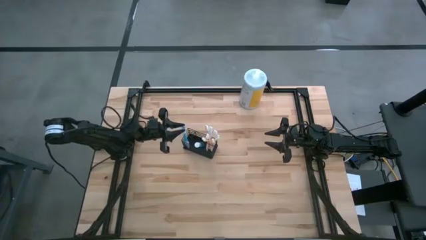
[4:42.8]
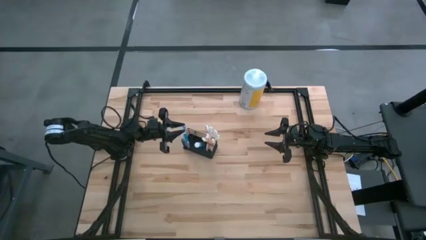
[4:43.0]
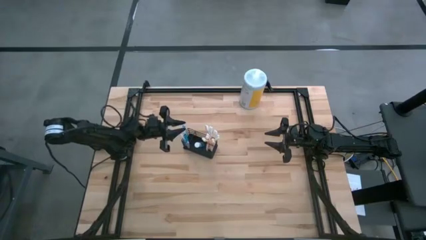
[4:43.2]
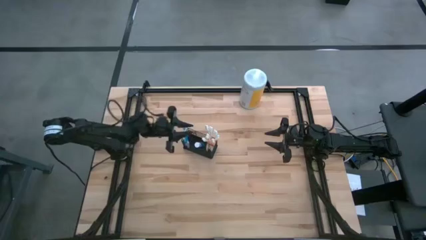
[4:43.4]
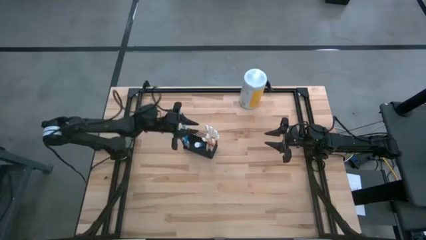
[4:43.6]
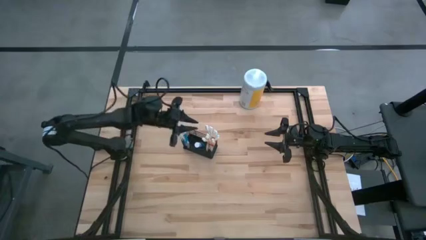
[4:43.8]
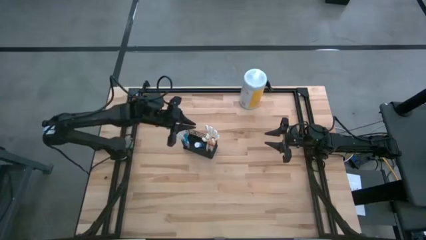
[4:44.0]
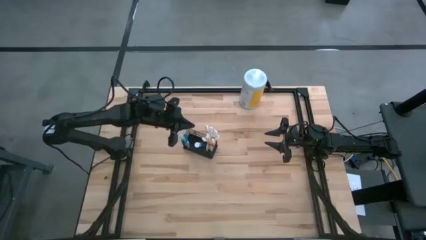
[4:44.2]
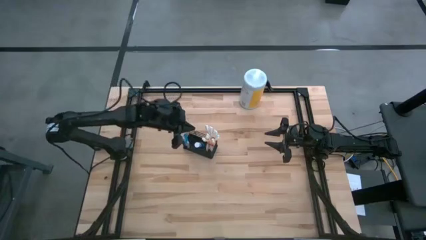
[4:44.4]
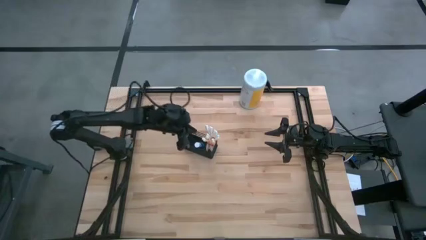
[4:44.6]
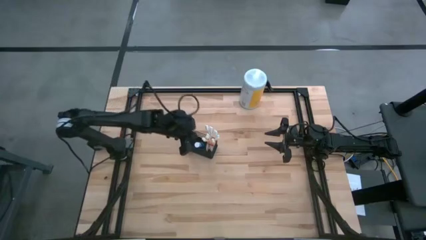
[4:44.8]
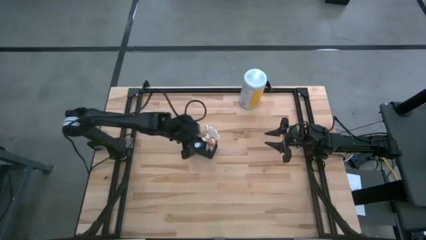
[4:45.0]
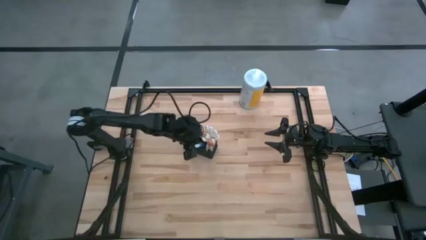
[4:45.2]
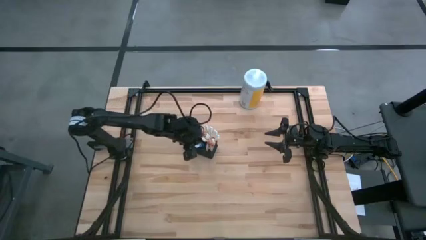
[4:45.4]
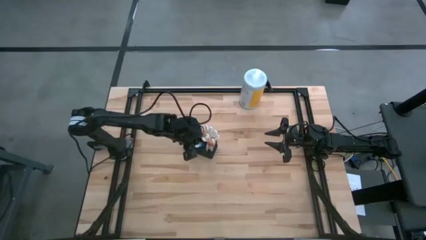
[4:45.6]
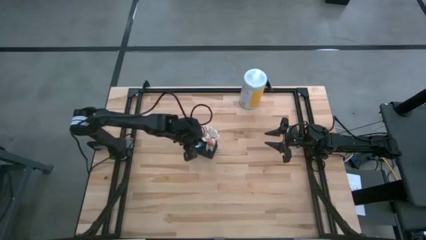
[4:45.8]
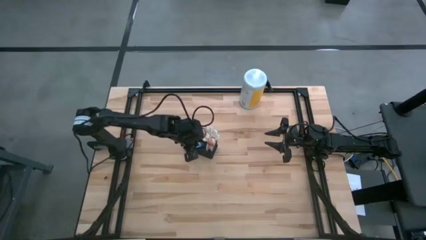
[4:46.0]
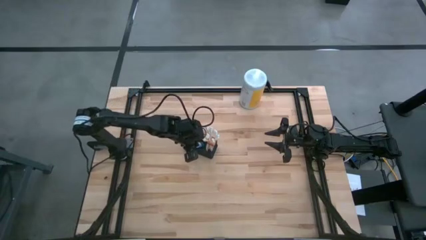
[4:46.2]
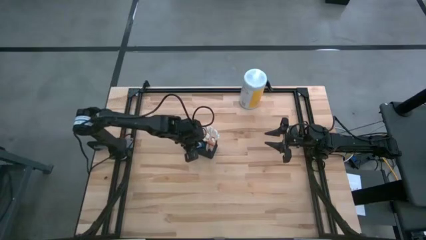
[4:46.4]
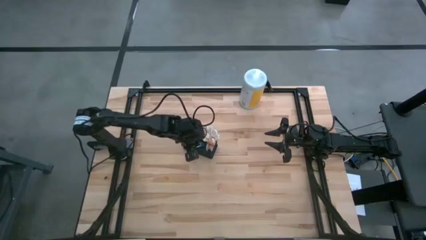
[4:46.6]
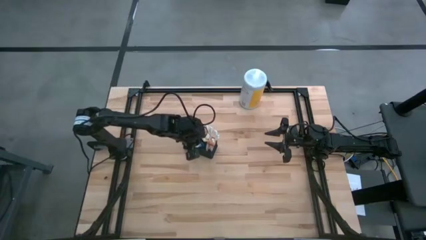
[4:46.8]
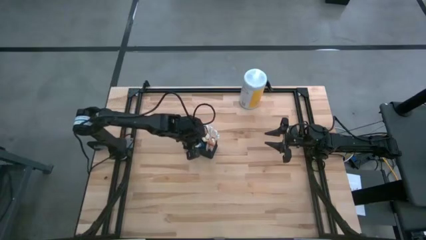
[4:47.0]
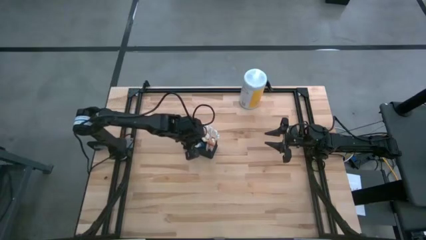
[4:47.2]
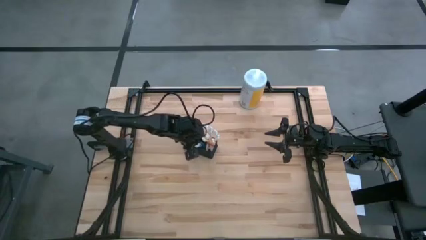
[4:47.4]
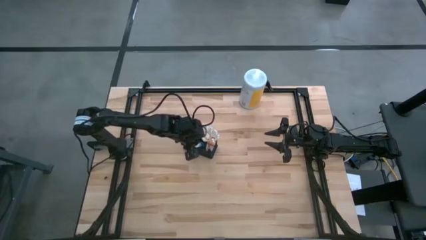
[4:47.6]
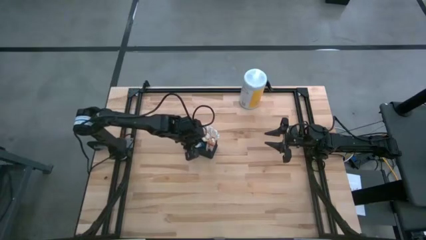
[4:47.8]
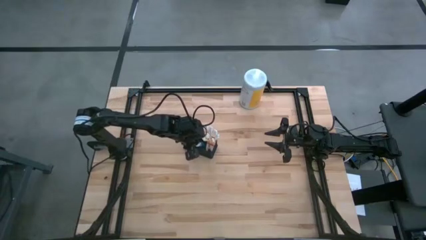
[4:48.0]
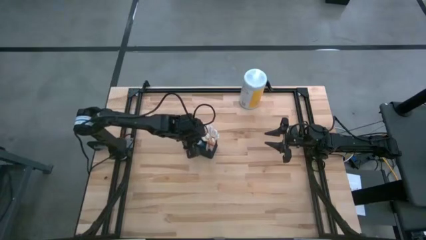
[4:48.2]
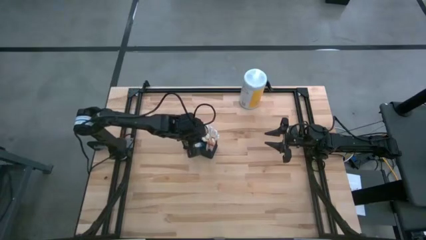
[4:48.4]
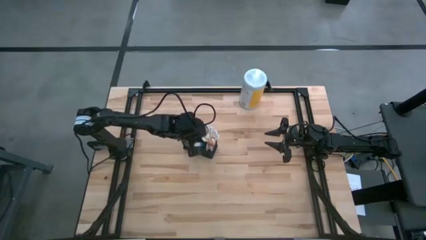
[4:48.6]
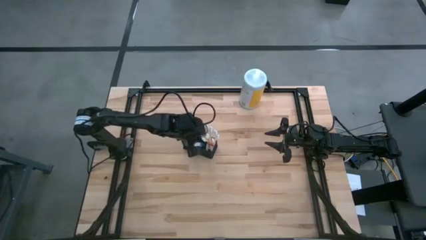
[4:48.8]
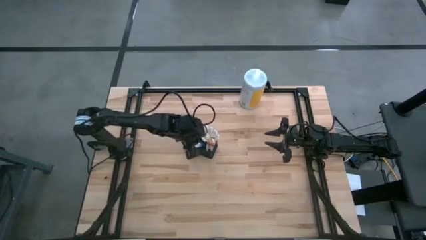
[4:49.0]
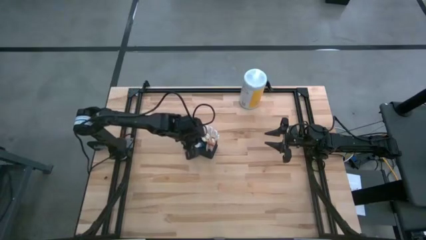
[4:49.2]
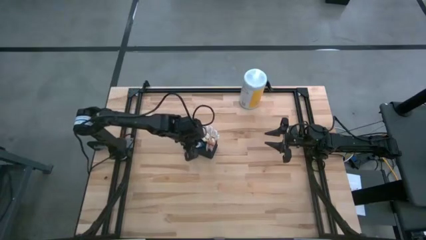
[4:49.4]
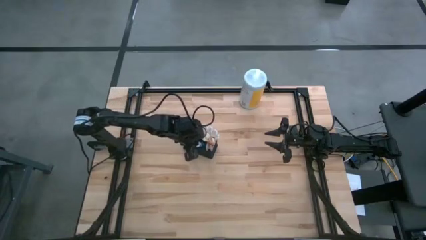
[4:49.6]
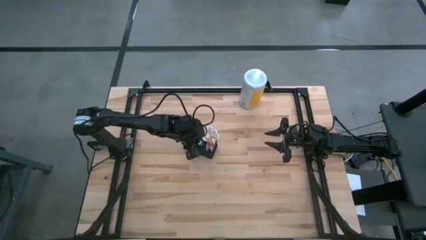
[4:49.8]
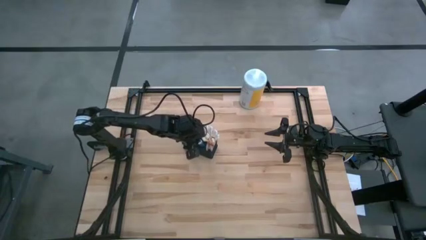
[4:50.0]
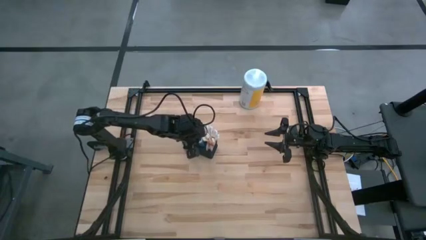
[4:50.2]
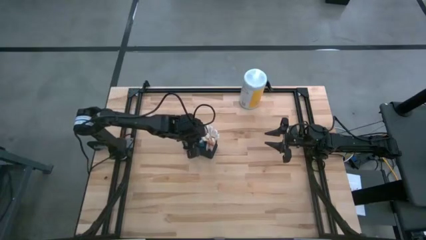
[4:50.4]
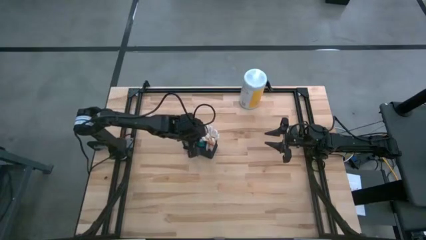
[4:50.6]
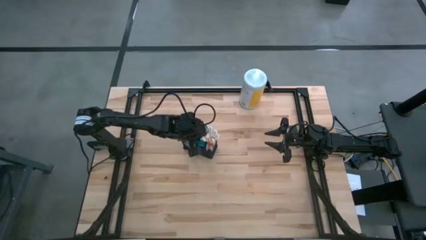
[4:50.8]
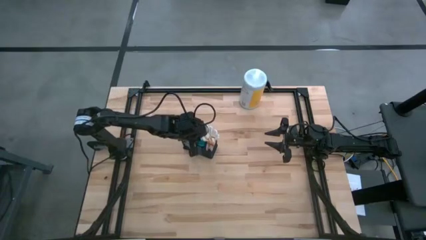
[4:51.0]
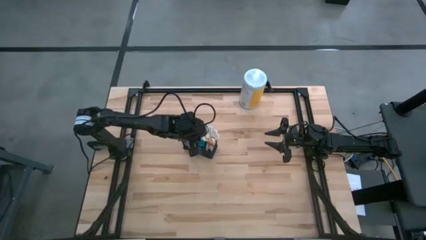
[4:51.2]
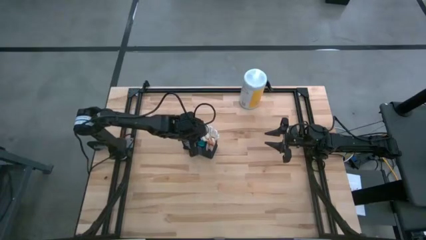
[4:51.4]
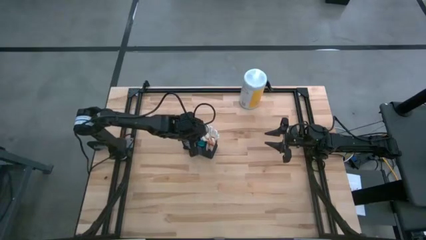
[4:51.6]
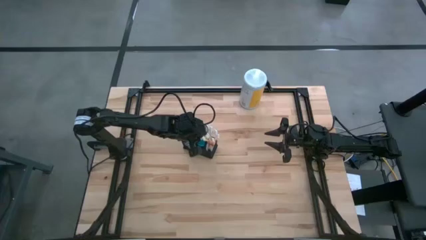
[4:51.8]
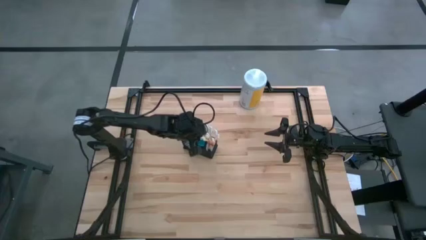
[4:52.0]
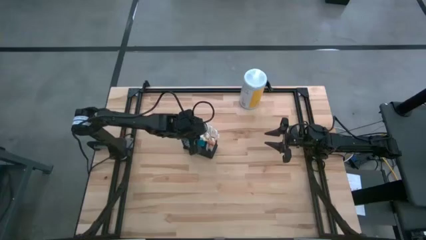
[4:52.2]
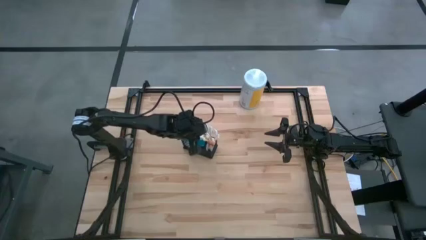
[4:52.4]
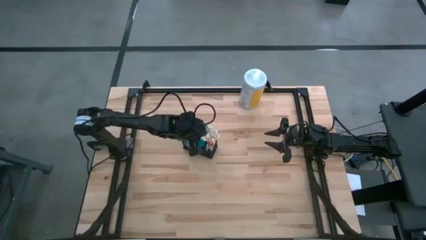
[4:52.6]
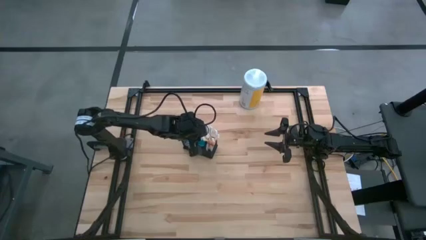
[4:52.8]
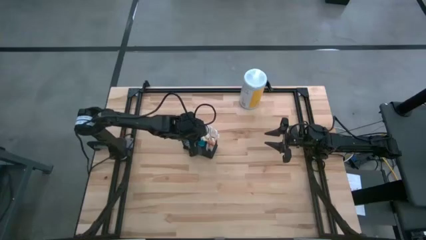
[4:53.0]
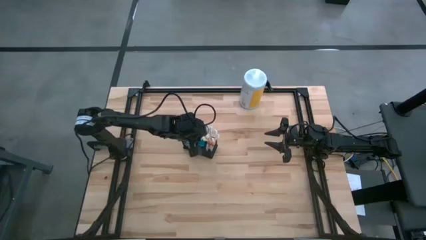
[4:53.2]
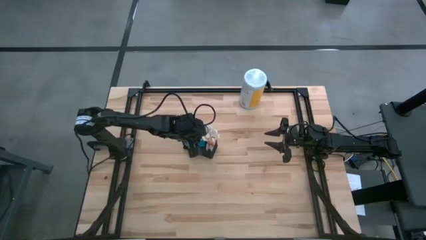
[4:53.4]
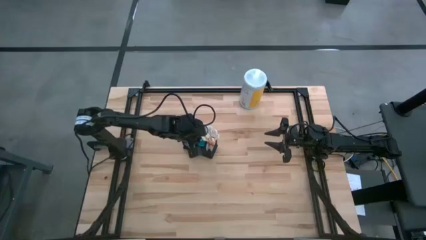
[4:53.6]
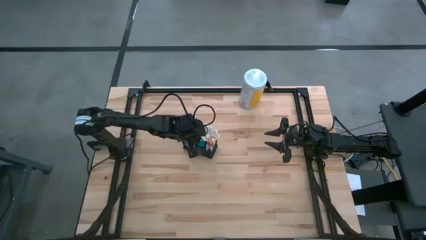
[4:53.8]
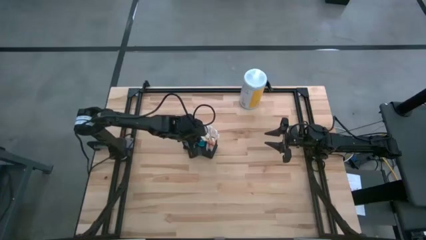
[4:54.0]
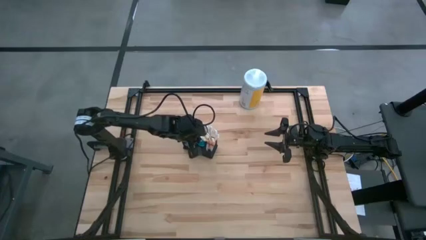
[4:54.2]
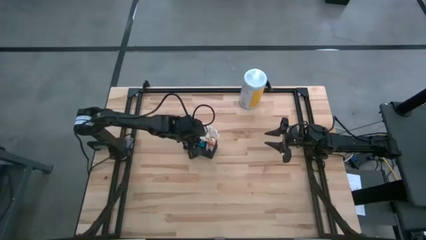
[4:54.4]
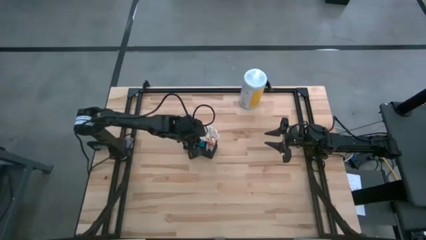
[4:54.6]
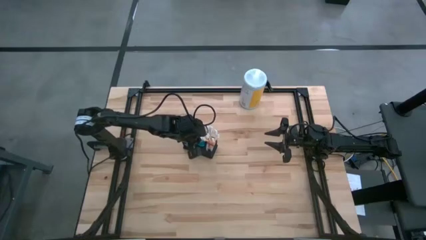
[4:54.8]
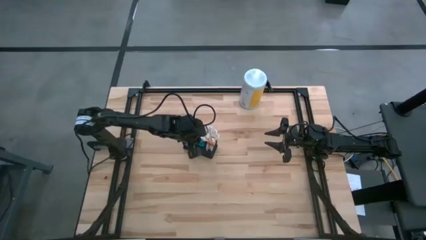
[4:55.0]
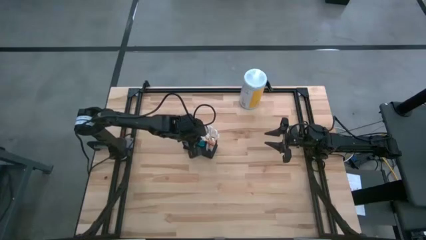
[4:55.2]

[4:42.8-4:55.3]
Task: Pick & Place toothbrushing station
Adjust the blue mouthwash in the wire organizer

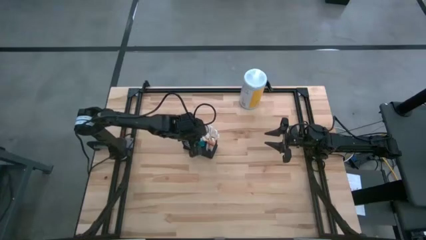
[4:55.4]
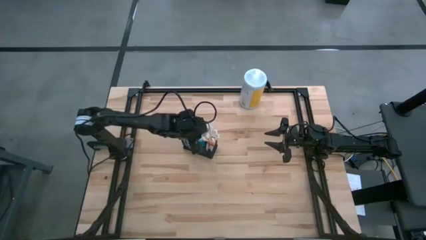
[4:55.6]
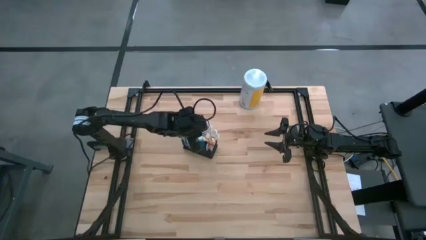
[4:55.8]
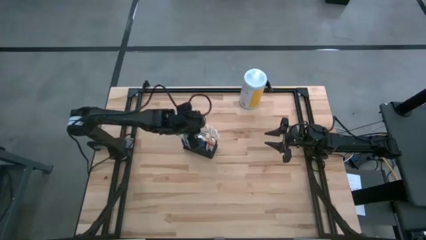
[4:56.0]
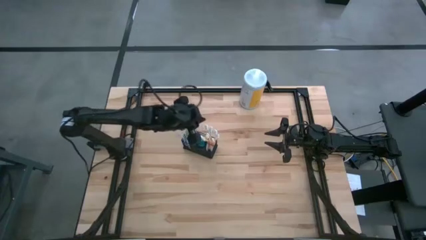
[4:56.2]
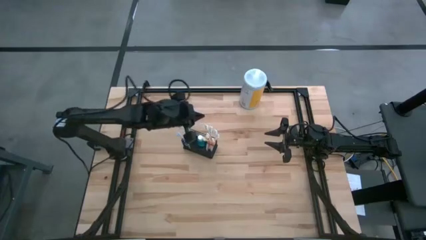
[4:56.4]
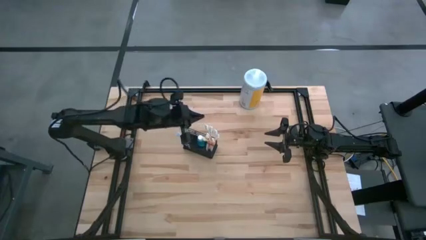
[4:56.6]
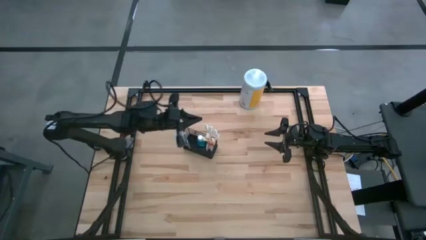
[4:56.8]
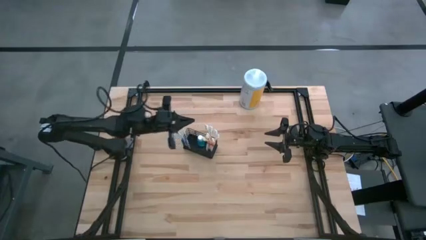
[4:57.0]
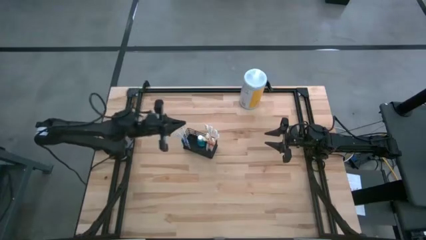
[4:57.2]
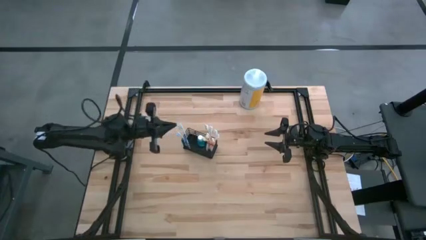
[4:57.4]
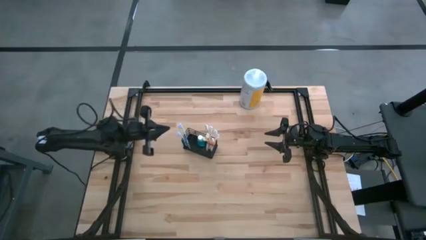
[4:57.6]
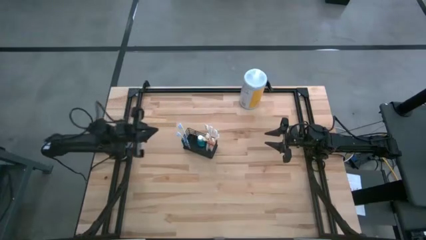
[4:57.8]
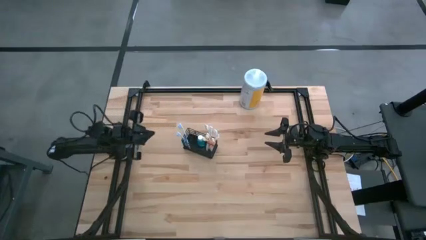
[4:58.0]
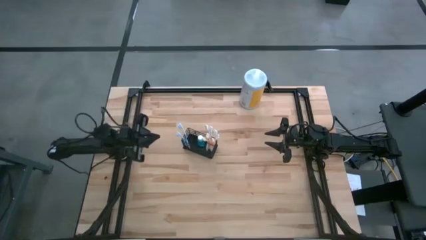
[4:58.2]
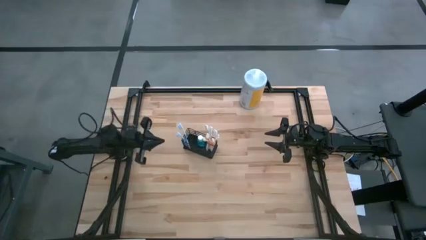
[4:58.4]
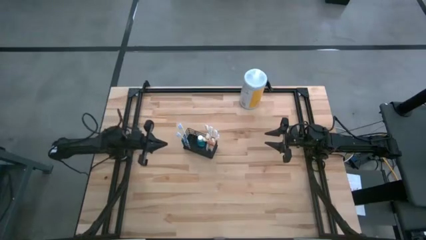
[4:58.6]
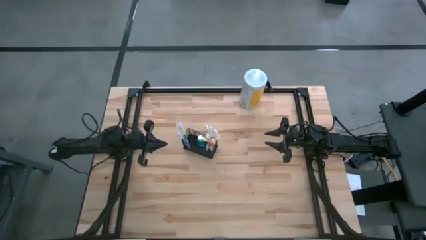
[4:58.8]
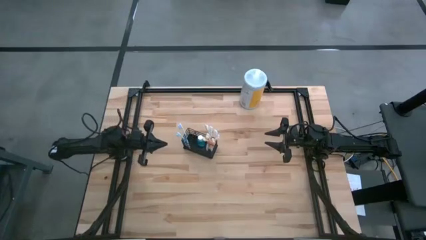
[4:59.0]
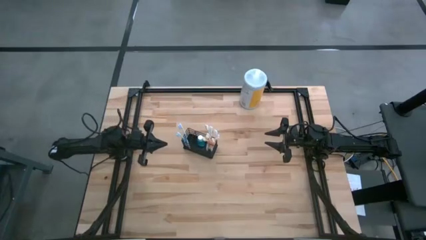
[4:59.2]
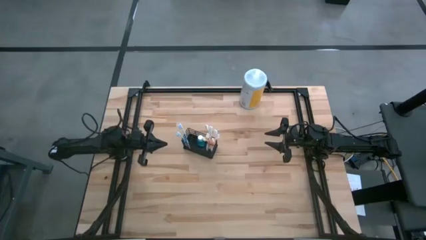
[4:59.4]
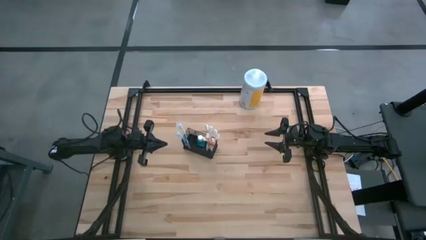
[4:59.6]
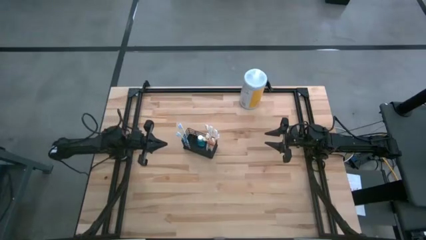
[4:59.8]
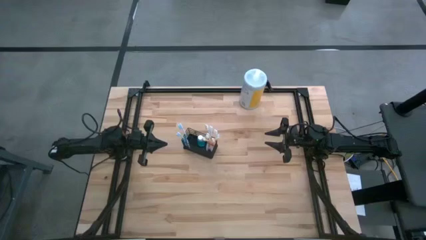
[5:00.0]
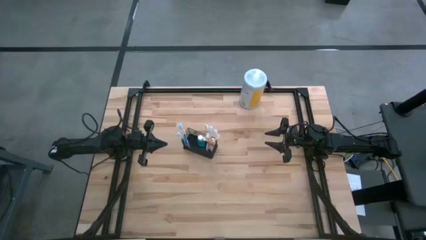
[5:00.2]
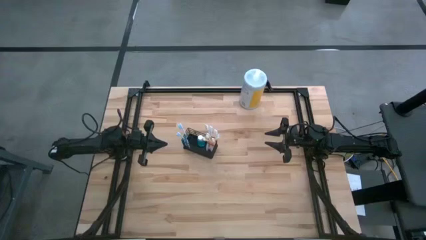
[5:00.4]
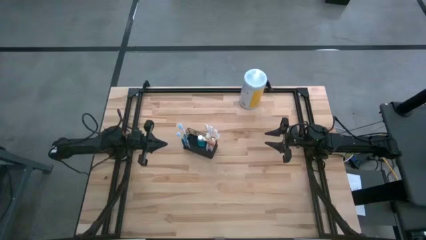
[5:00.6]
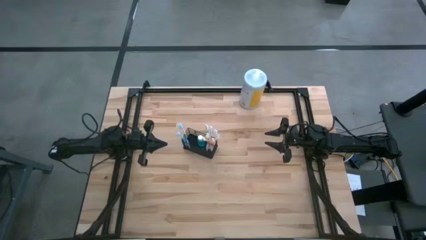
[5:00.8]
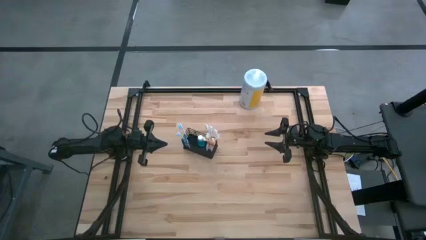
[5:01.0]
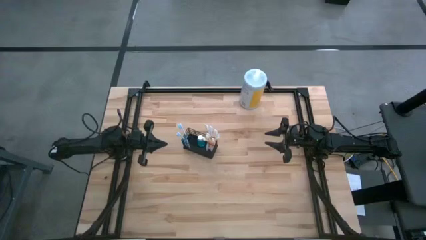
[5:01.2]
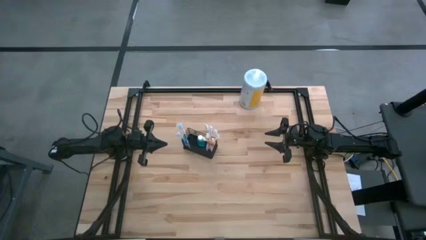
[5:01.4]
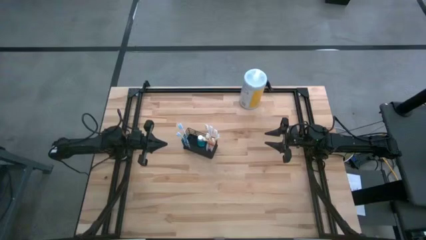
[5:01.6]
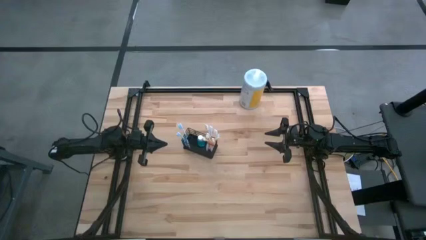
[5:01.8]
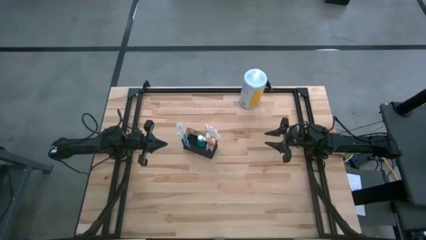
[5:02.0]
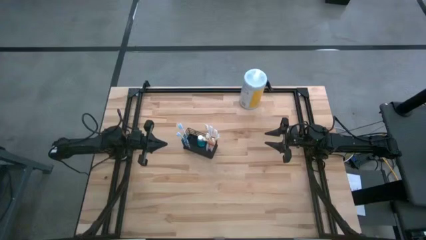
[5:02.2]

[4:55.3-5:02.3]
Return to Home Position
